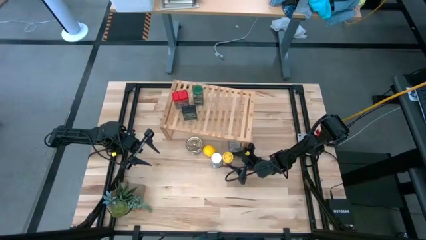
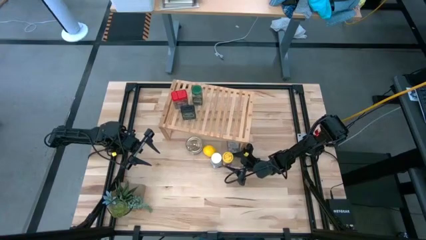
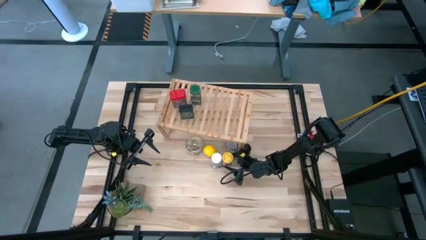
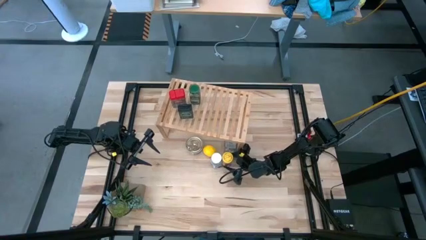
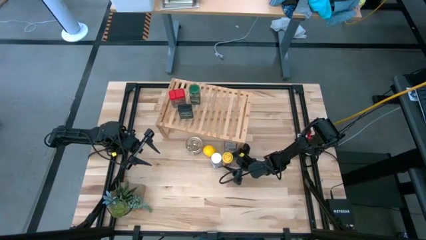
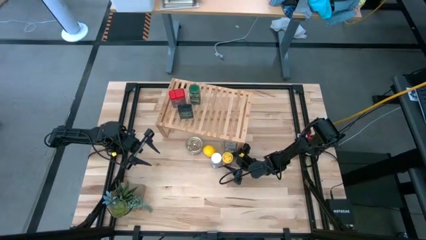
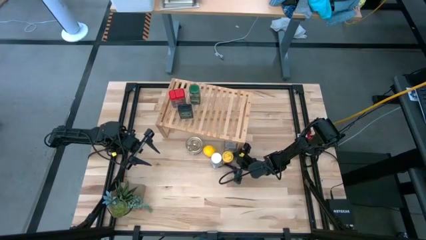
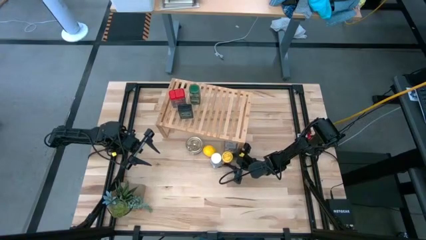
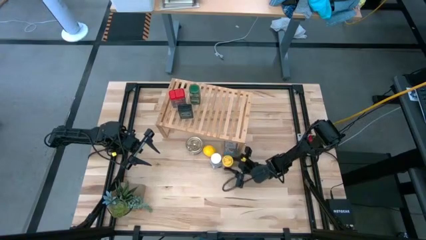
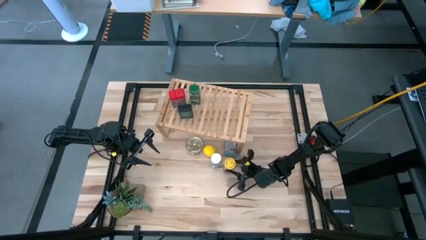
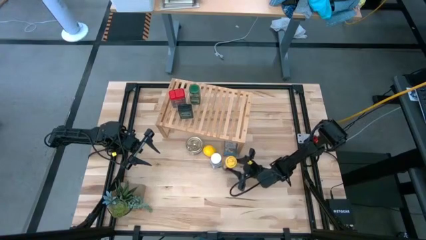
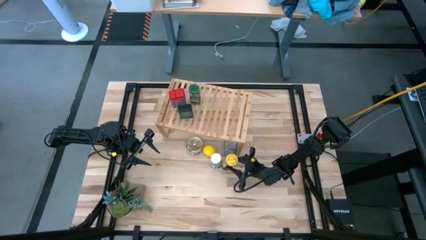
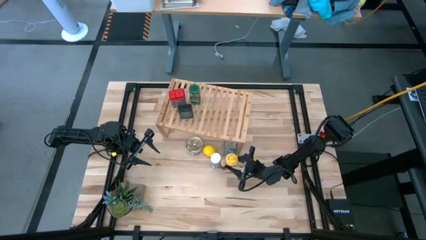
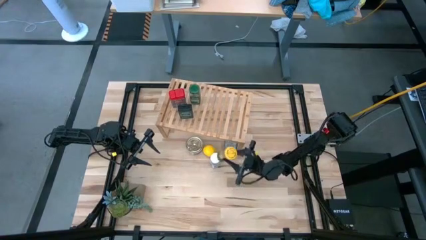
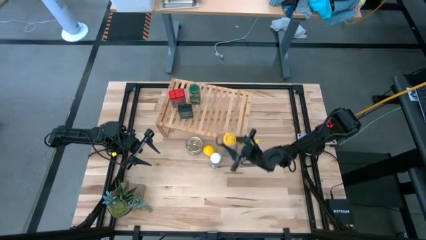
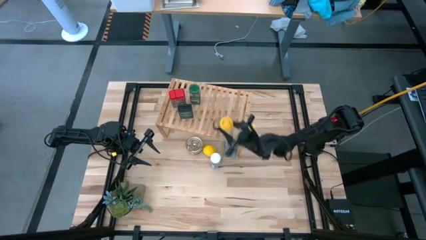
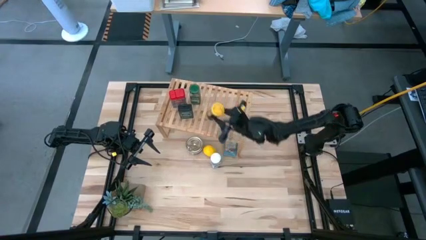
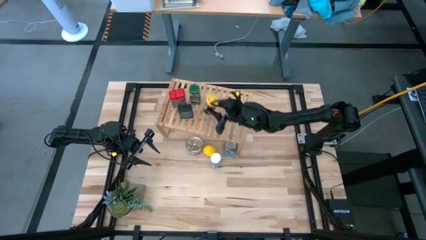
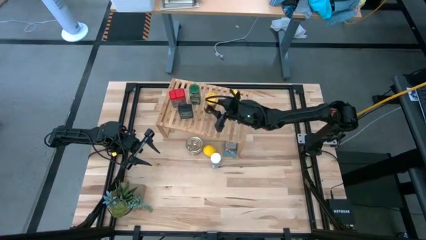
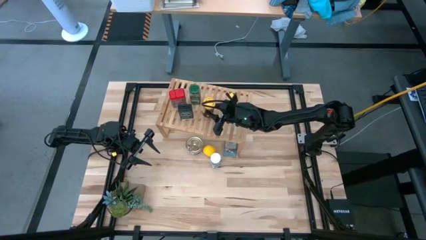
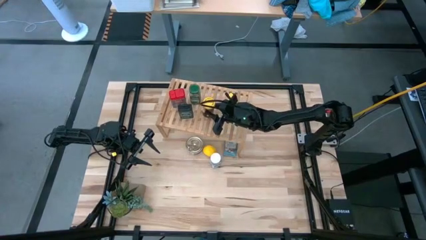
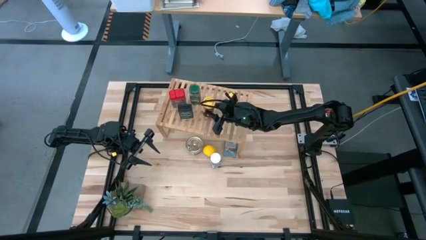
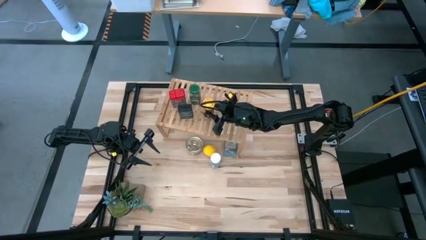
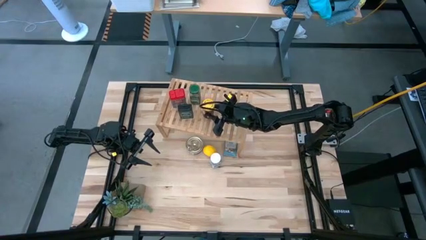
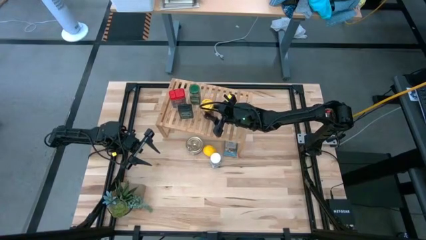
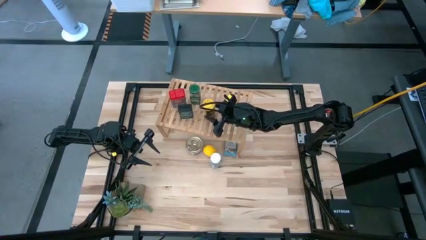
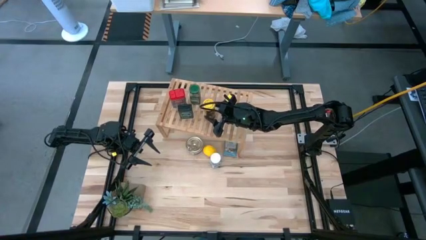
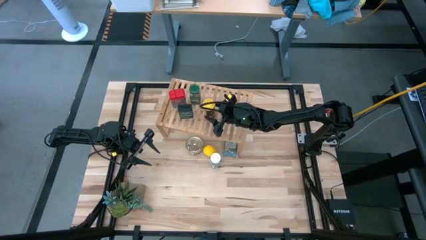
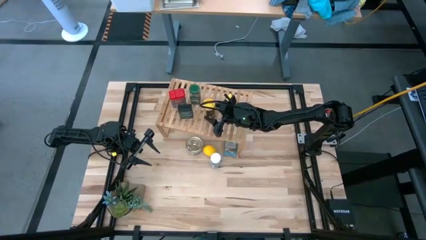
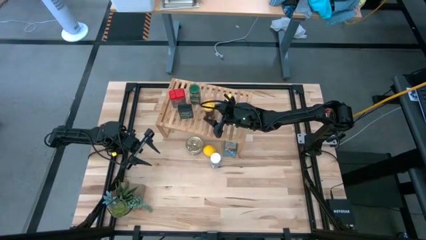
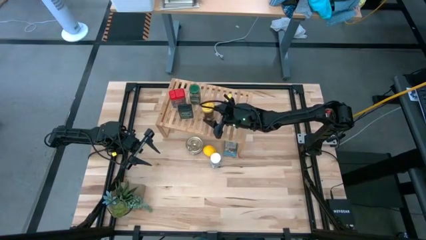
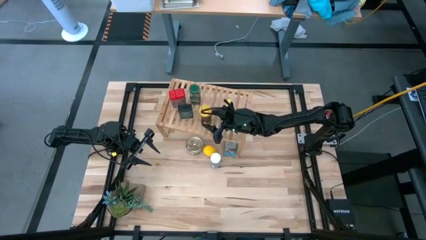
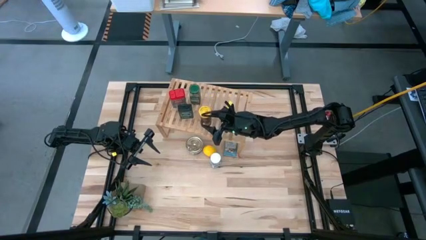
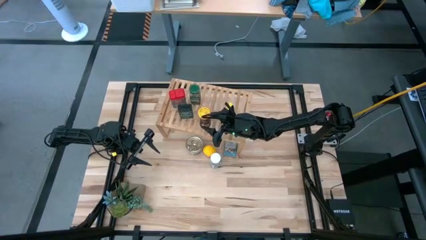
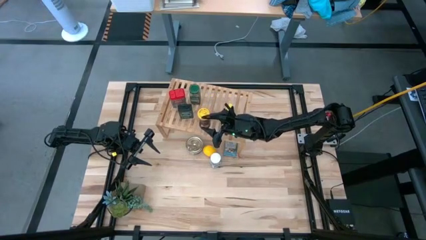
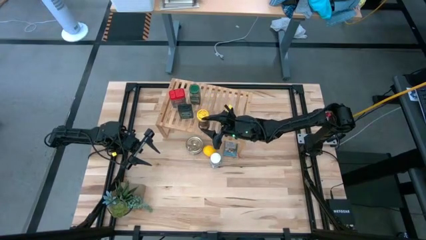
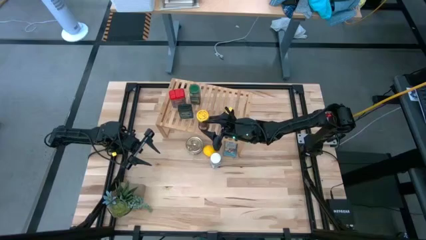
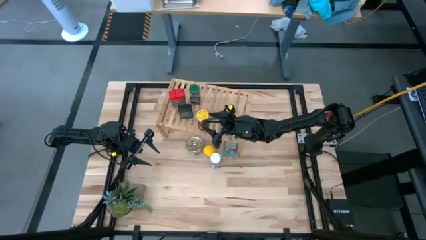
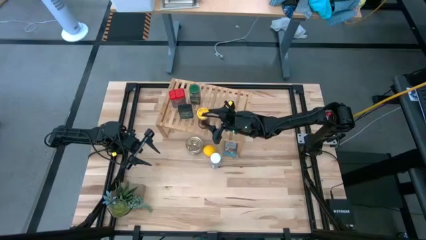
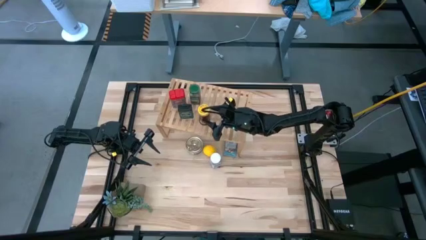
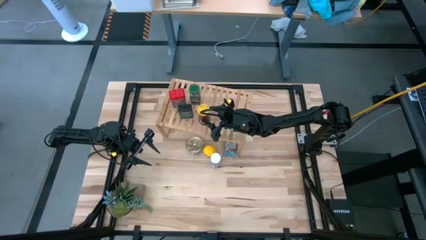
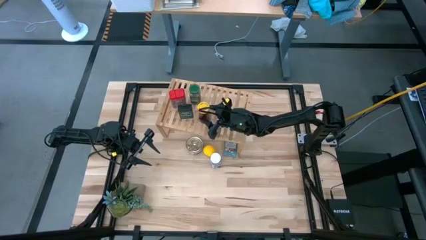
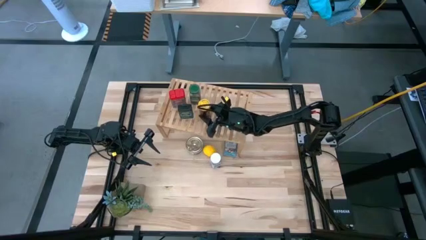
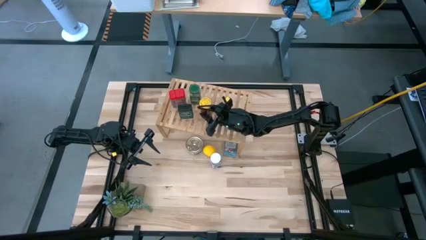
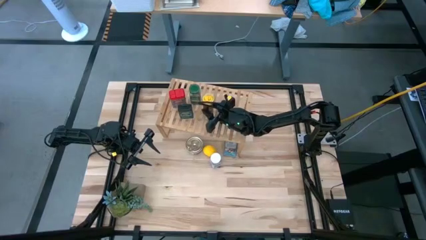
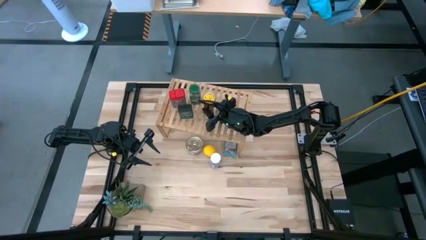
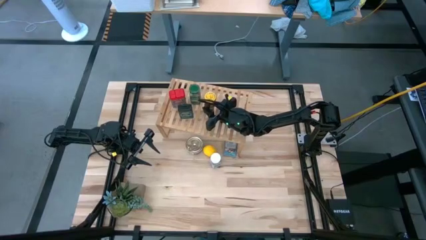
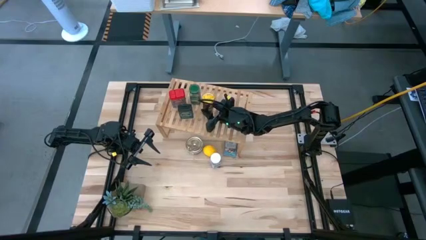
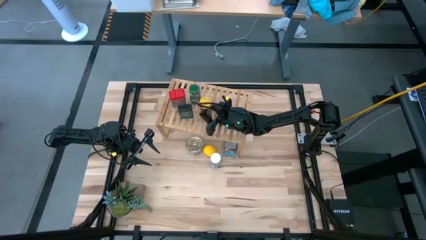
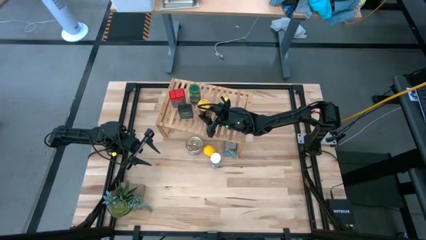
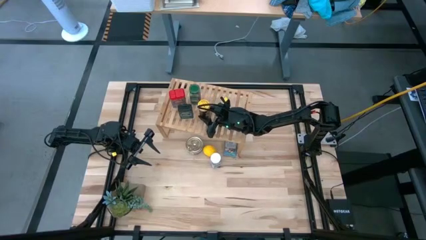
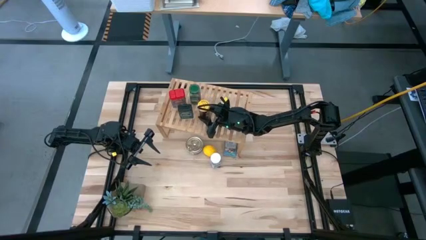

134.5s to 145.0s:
Task: Shelf spices
Put the yellow seasoning bottle on the shelf

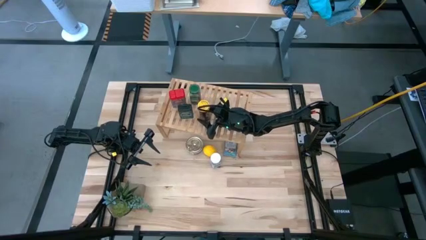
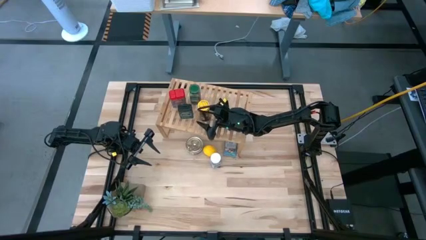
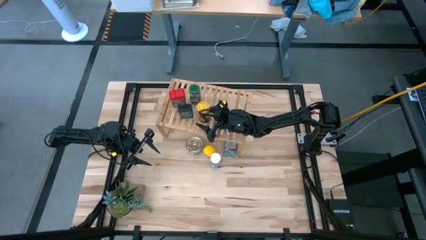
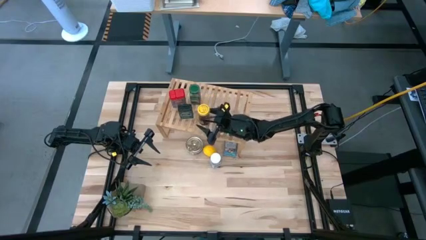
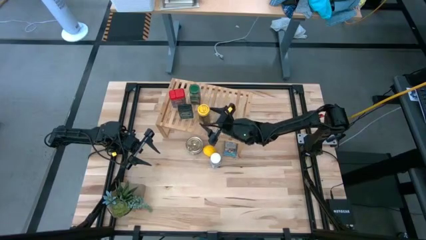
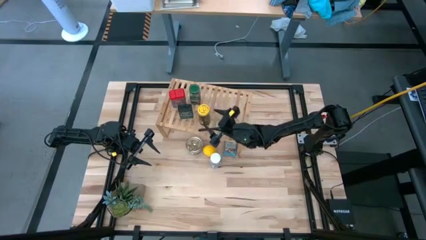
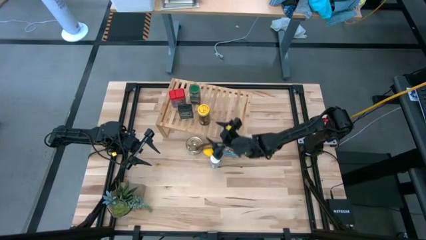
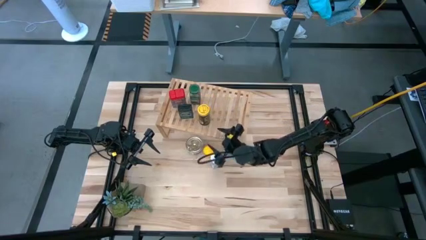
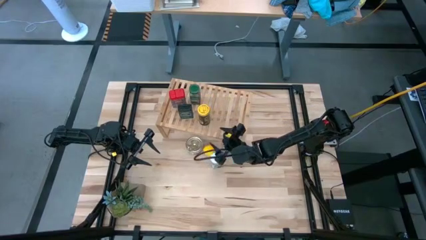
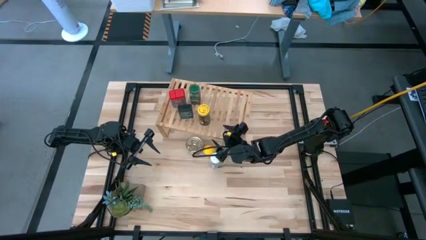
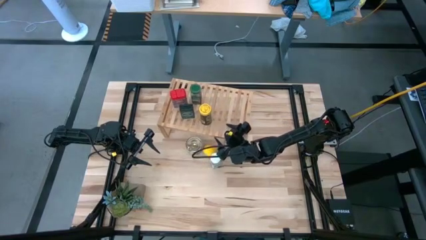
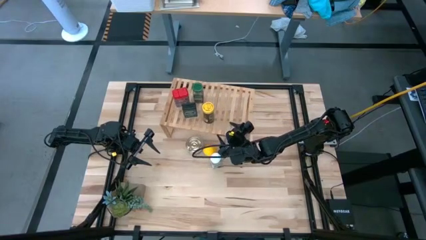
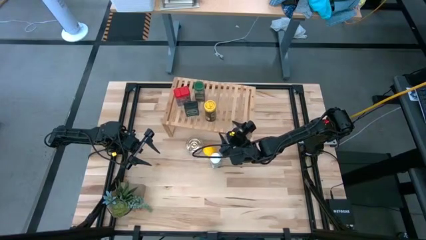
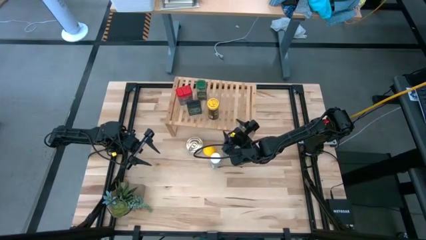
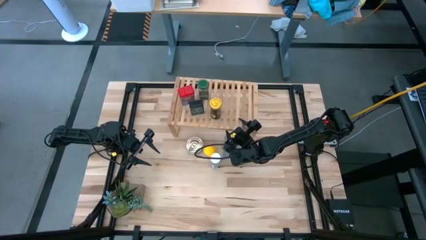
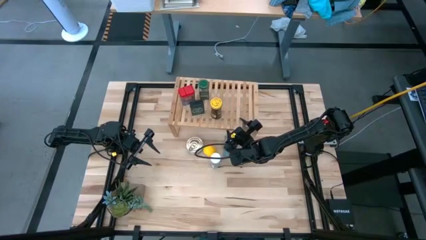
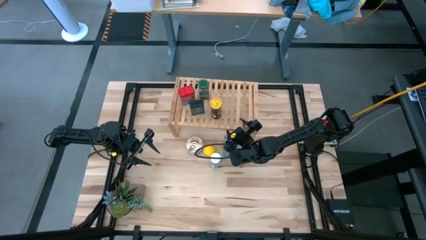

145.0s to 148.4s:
Adjust the shelf

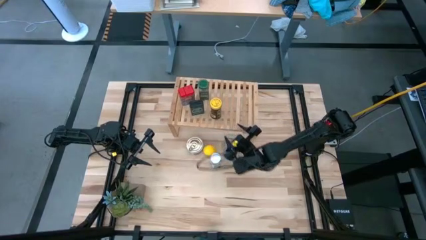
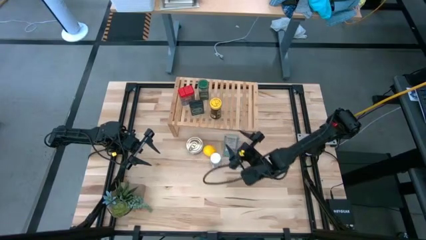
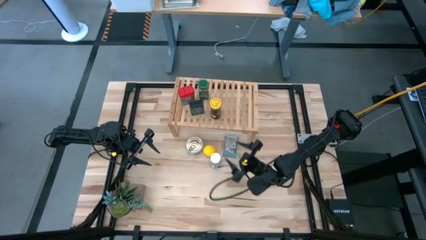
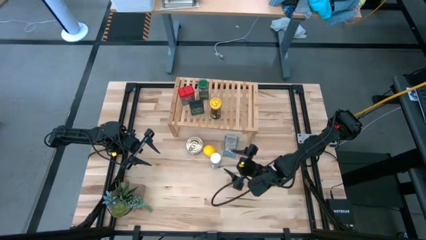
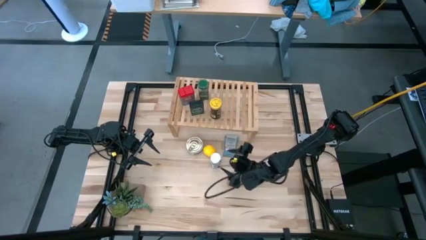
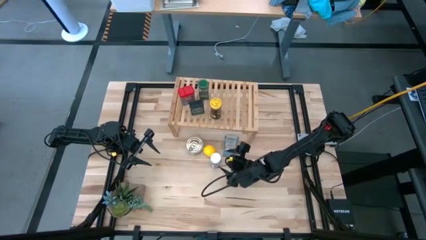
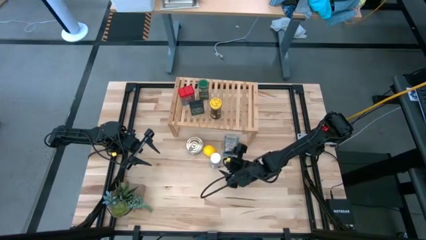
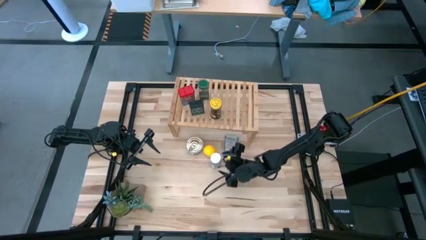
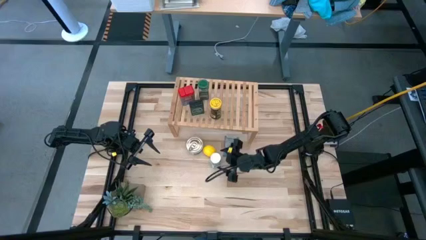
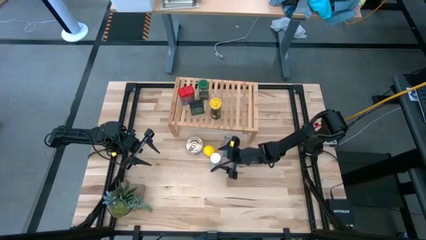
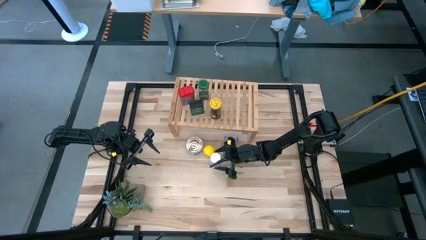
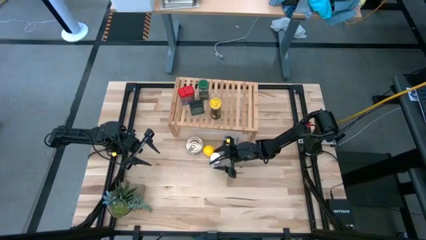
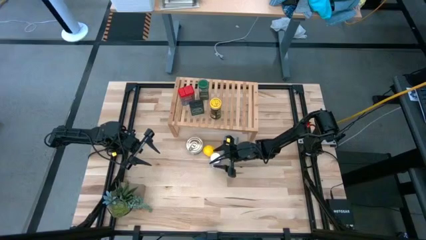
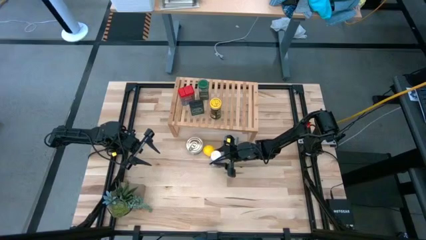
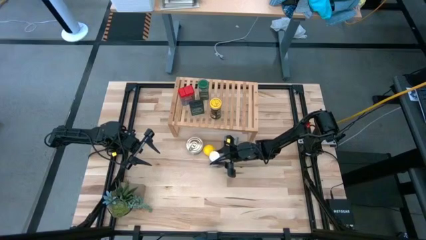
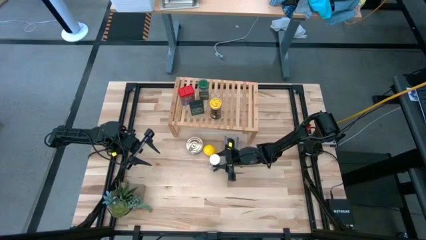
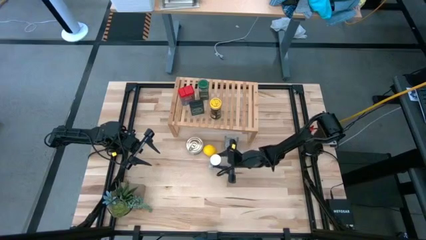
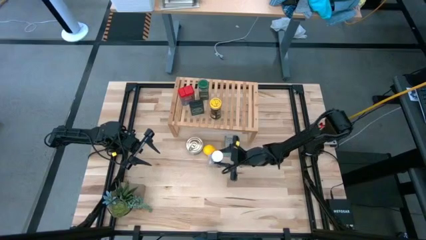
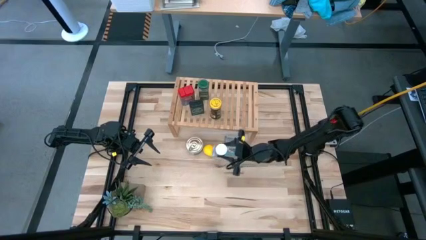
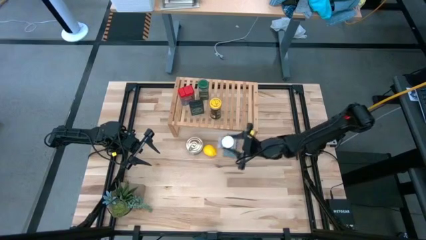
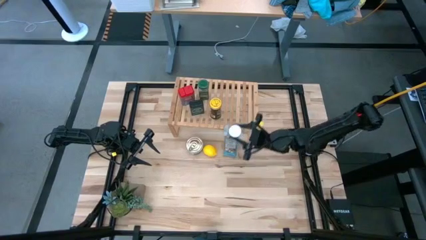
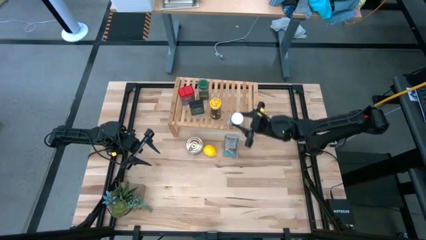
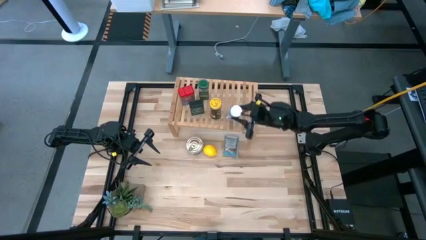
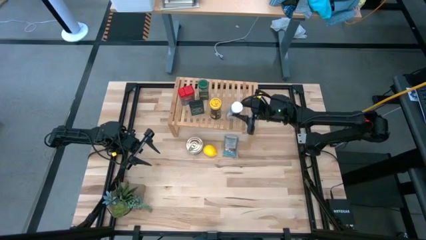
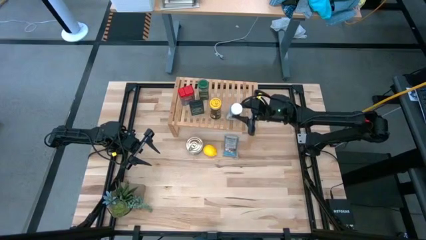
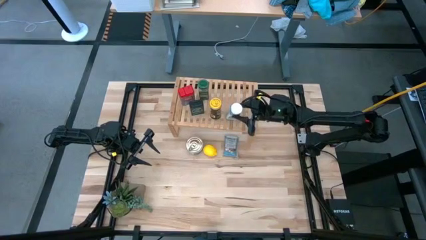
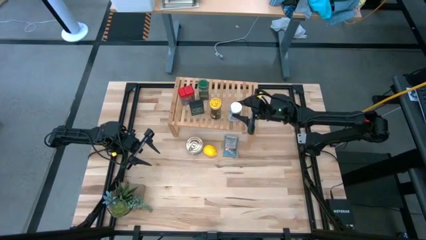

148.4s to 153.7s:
Put the white seasoning bottle on the shelf
